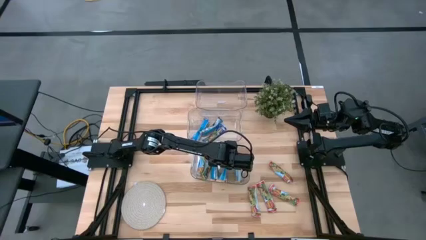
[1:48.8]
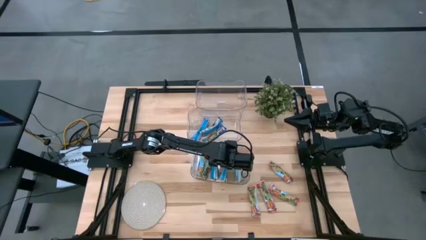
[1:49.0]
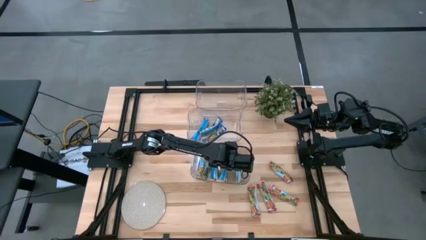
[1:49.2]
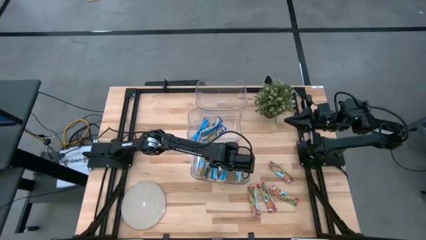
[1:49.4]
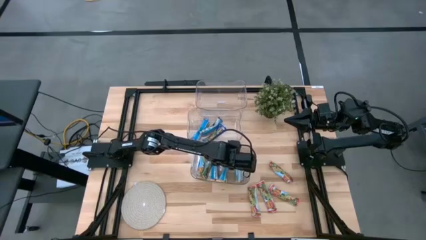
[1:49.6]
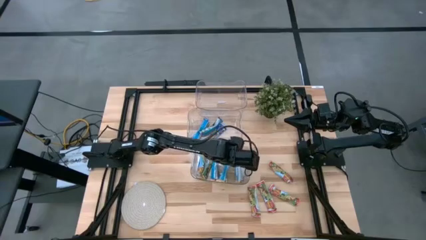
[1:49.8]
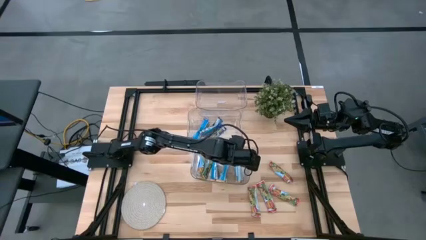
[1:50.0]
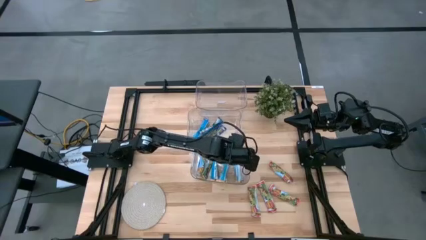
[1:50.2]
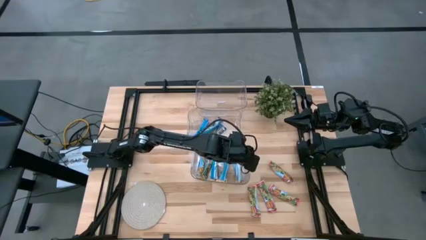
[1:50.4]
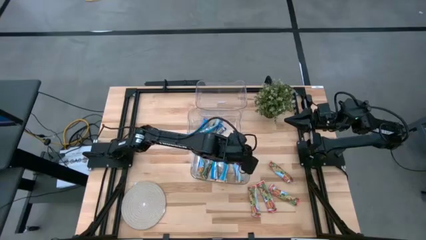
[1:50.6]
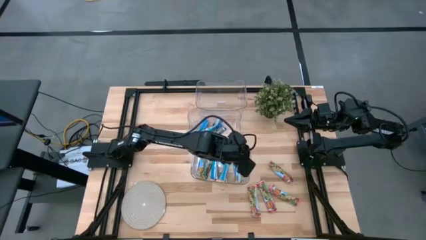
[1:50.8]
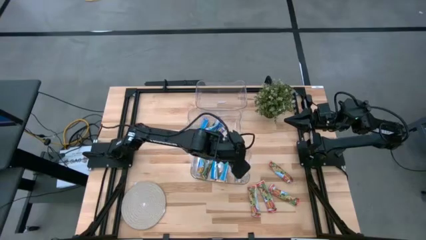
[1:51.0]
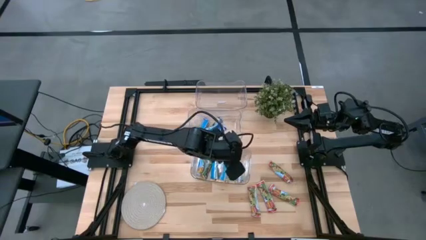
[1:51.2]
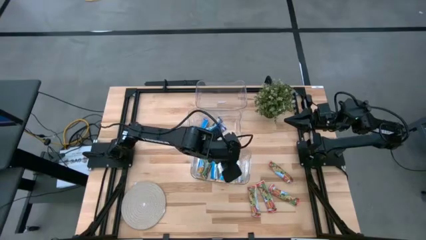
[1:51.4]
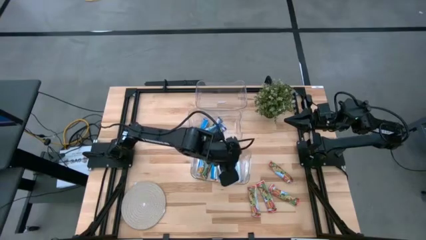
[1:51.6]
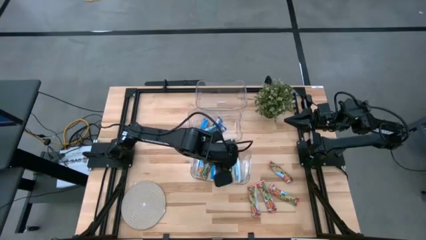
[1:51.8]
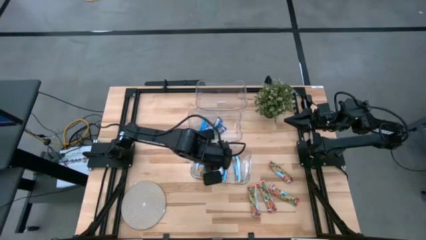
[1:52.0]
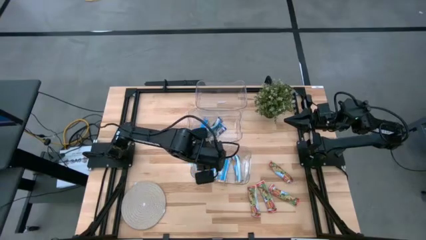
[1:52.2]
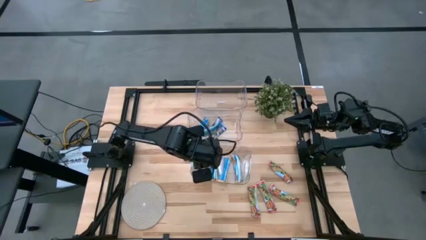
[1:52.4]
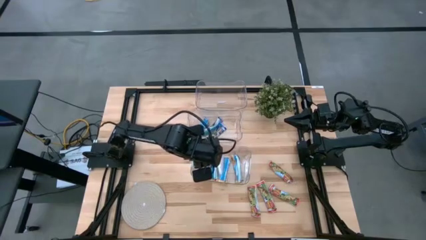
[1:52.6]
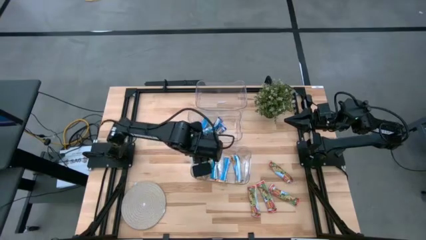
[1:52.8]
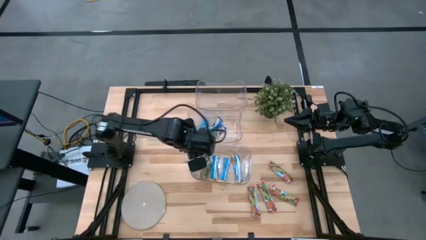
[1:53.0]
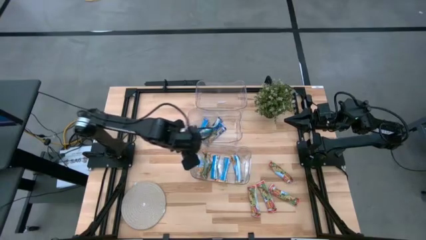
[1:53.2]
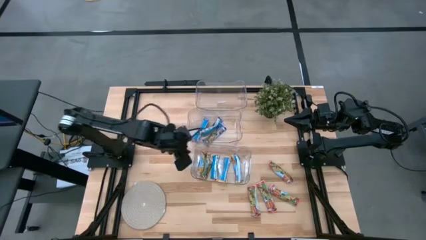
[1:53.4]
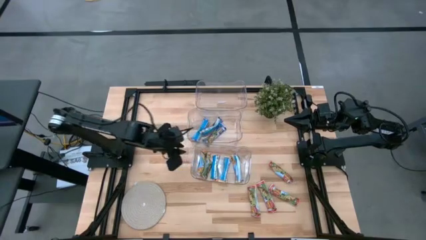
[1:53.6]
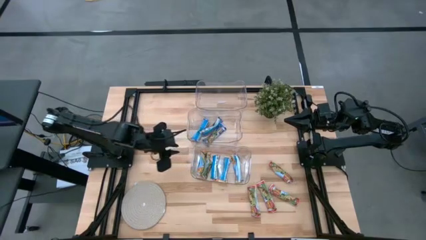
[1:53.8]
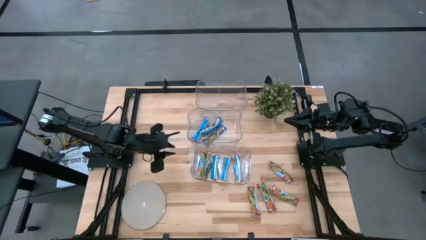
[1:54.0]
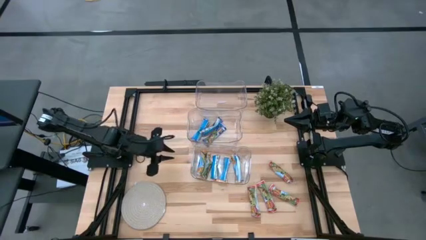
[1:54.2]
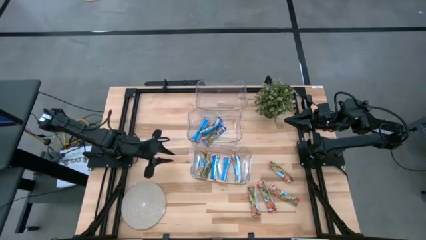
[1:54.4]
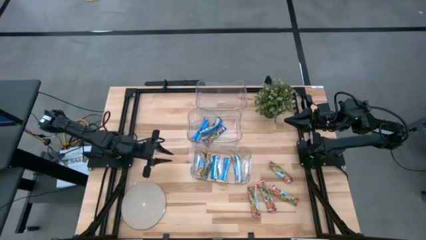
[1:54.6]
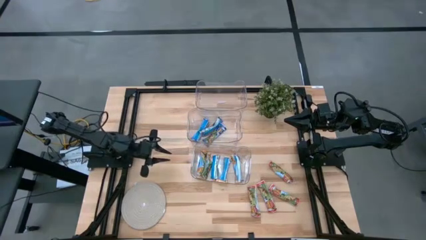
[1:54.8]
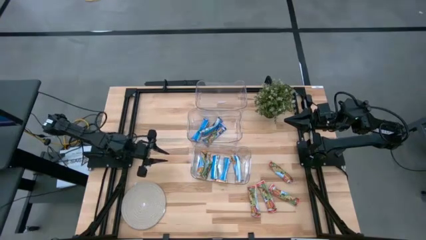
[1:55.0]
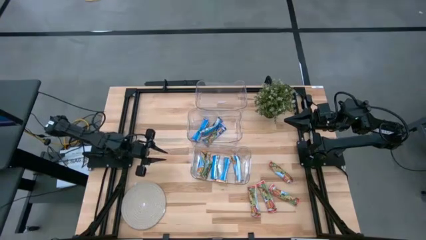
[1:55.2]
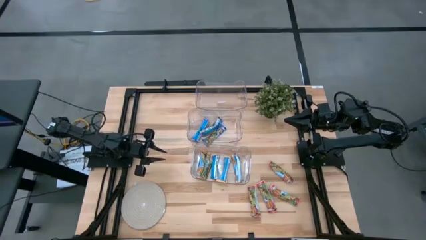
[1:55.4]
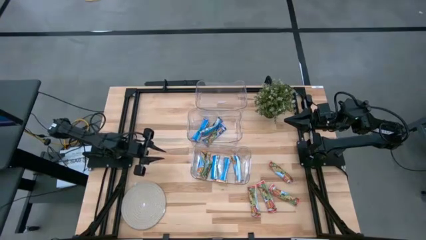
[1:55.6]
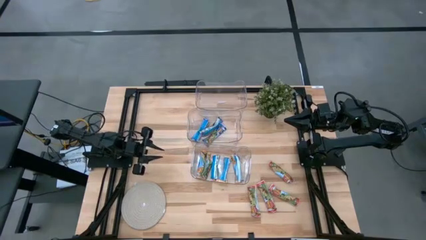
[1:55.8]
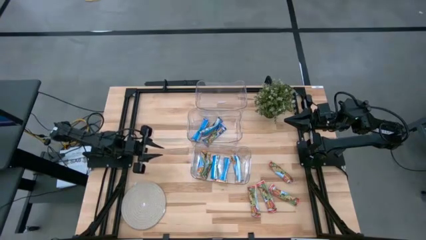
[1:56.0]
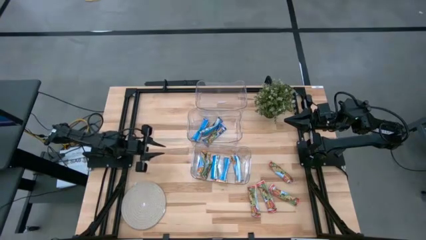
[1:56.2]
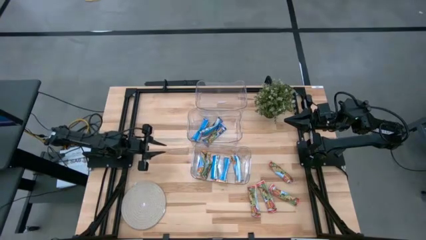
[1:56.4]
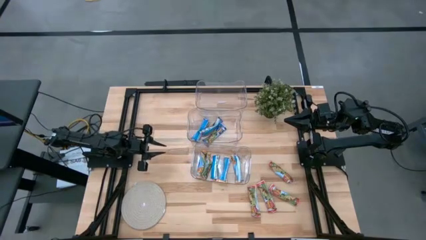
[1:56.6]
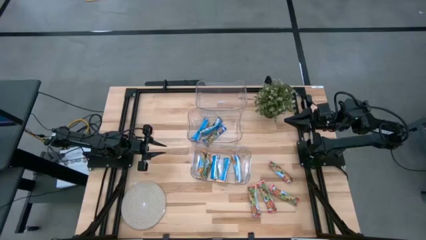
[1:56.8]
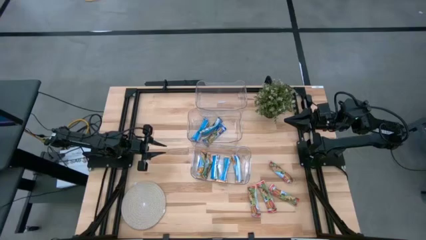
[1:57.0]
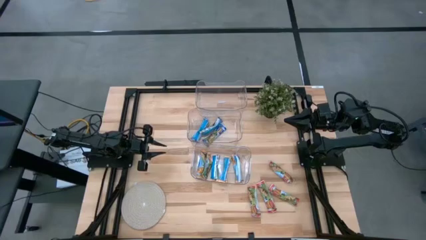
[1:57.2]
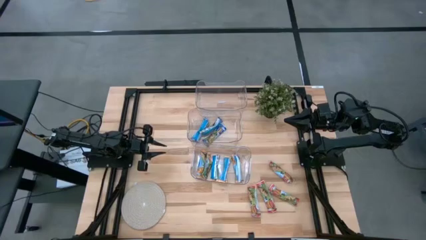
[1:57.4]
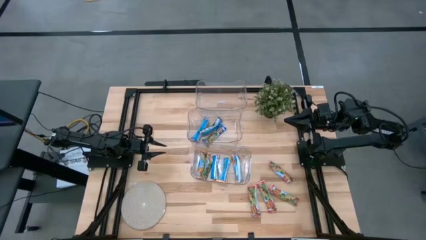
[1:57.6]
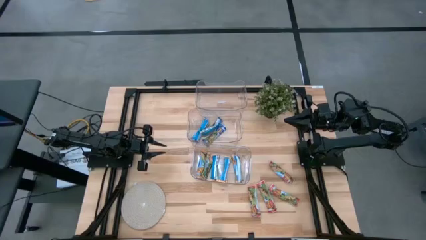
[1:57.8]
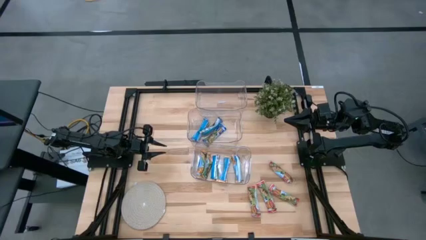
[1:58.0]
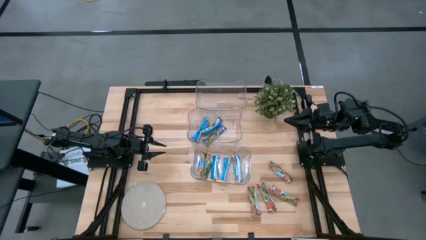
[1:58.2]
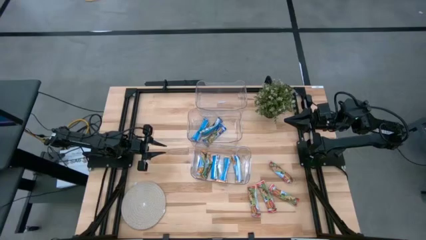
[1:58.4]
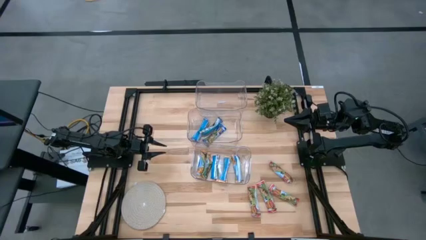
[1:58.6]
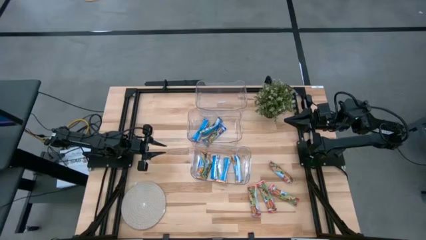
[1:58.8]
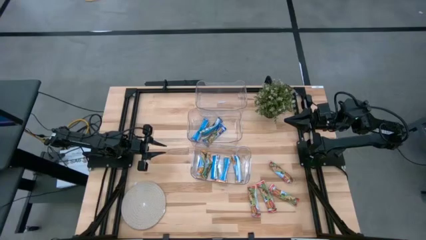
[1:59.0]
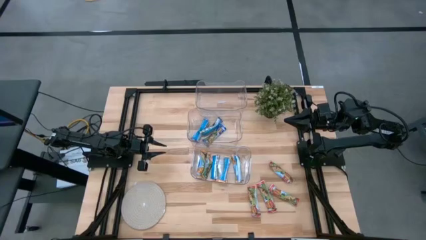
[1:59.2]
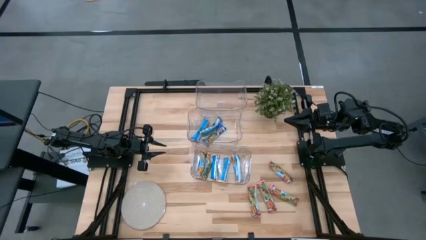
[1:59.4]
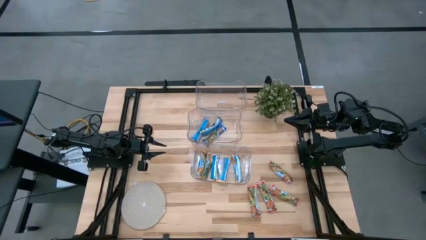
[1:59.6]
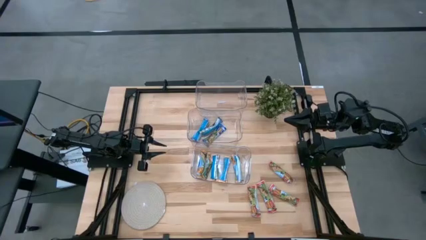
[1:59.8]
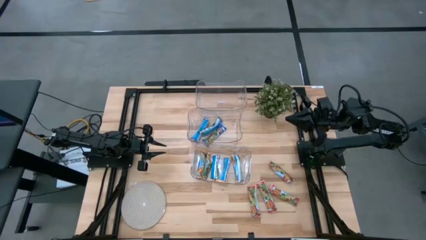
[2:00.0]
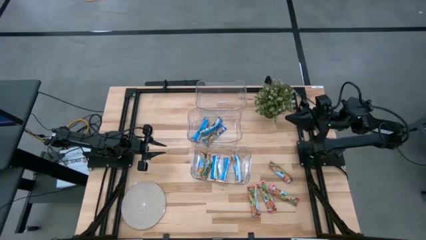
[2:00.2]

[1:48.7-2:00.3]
Task: Pick and place Granola Bars by type
Put the red granola bar into the top transparent bin

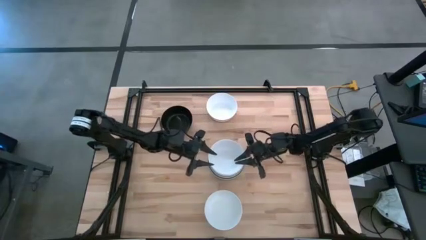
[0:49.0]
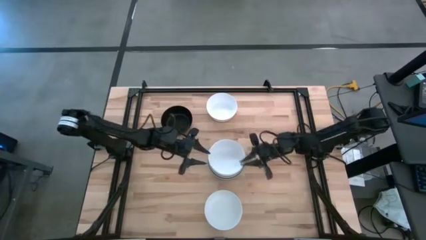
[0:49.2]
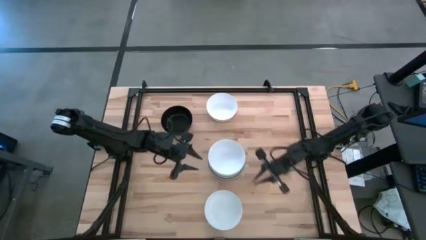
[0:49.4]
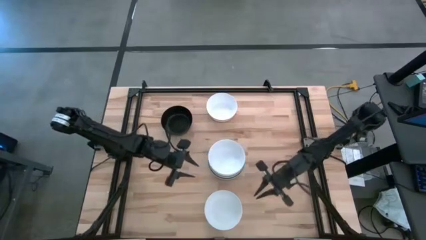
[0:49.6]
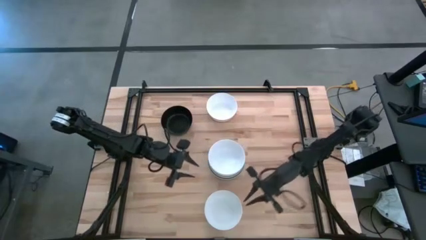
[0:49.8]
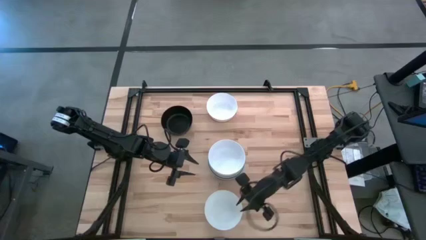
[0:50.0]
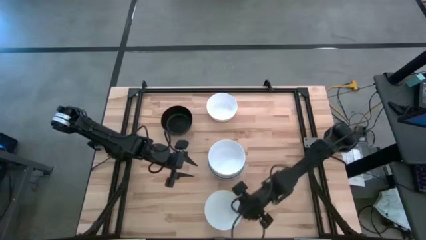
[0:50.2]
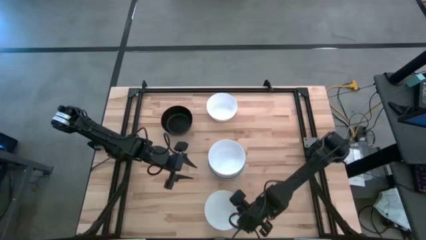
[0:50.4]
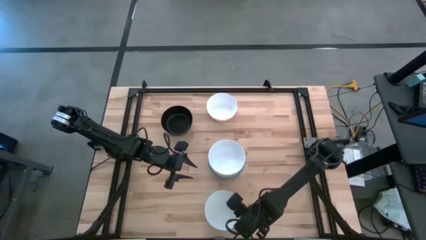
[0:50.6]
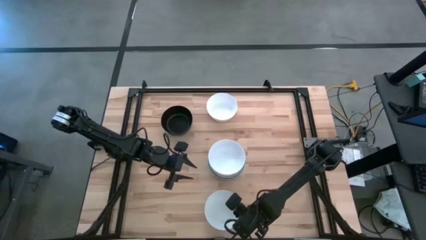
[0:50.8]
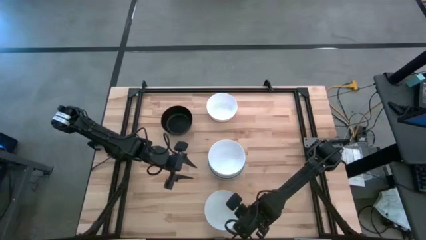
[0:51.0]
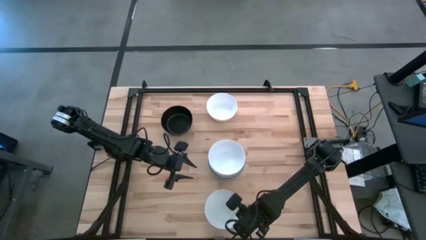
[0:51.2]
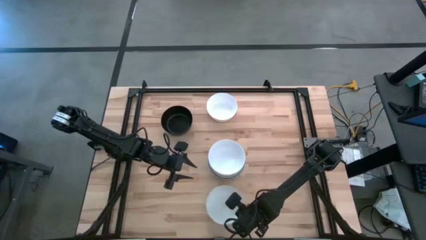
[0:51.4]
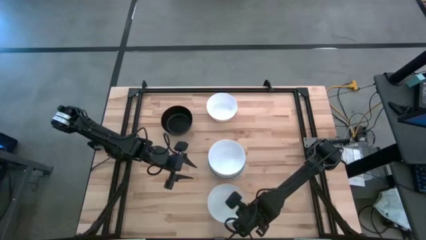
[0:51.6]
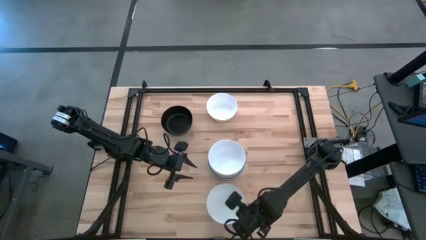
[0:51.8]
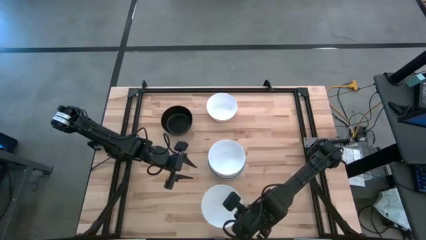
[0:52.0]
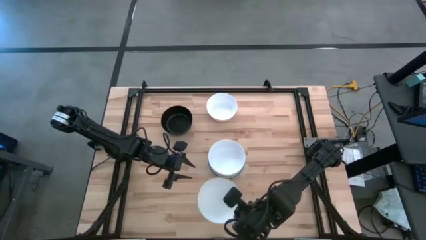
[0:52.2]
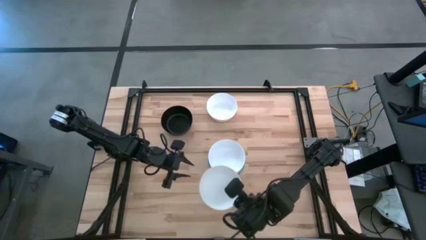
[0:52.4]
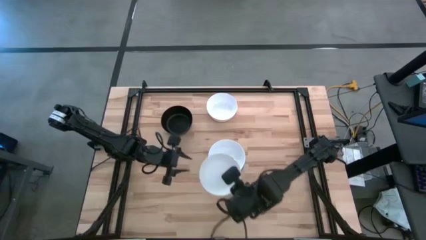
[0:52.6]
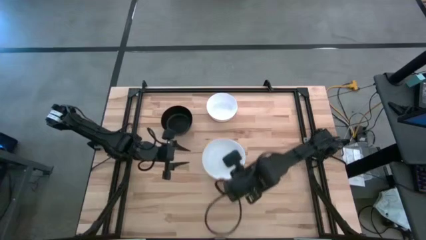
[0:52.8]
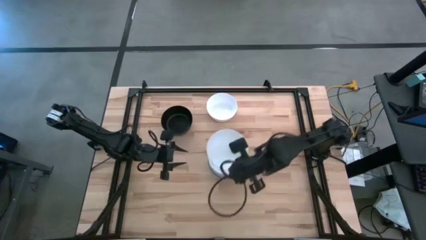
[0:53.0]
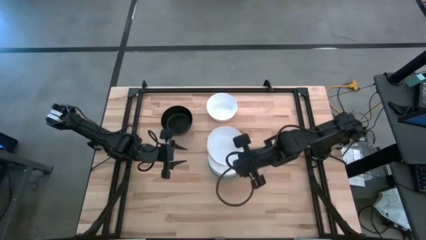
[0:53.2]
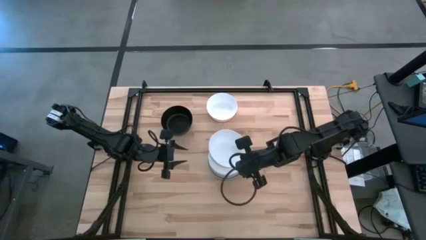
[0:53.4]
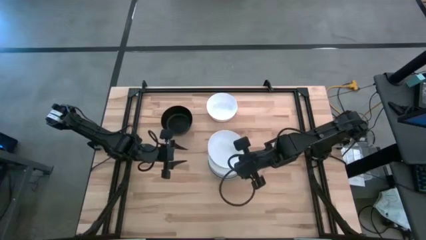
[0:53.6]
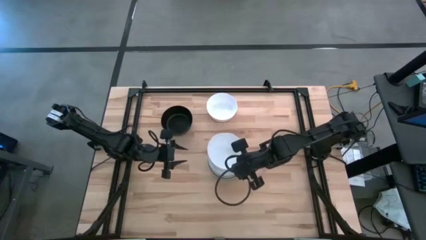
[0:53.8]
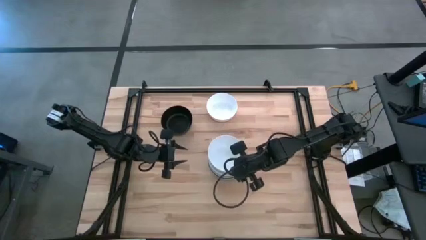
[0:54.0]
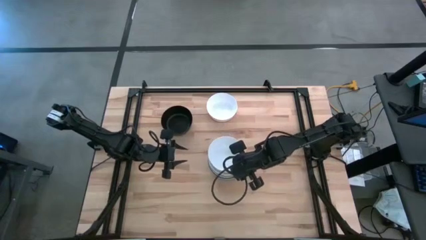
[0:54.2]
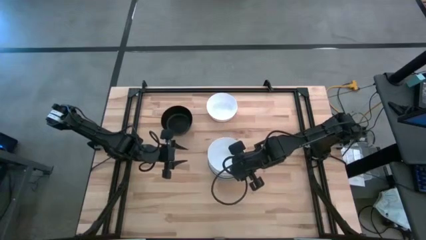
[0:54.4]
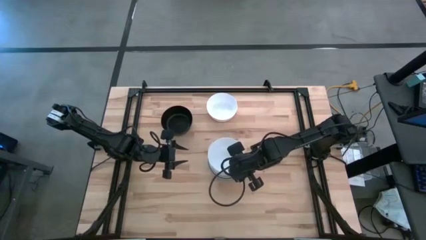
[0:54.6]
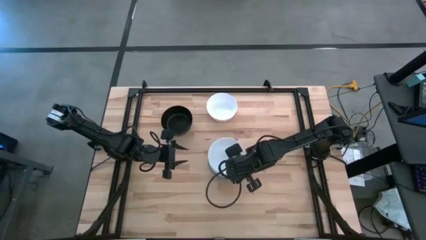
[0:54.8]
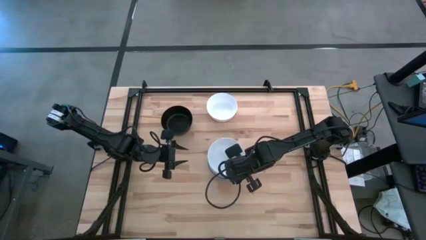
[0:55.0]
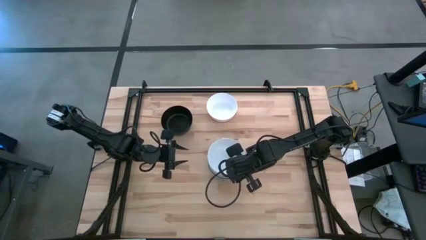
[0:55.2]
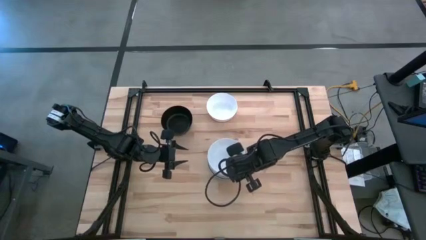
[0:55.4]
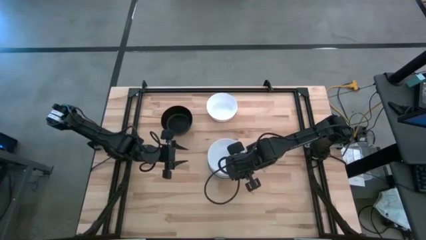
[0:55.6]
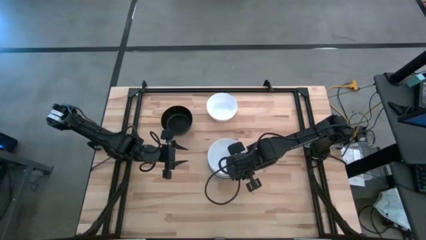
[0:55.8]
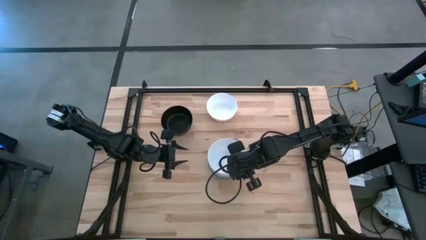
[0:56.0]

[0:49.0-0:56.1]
Task: Nest bowls inside each other
Stack the white bowl on top of the white bowl
